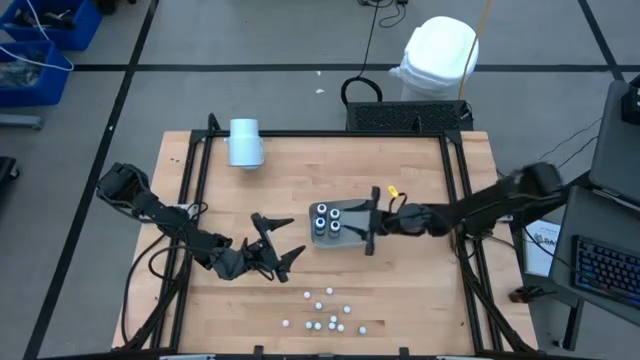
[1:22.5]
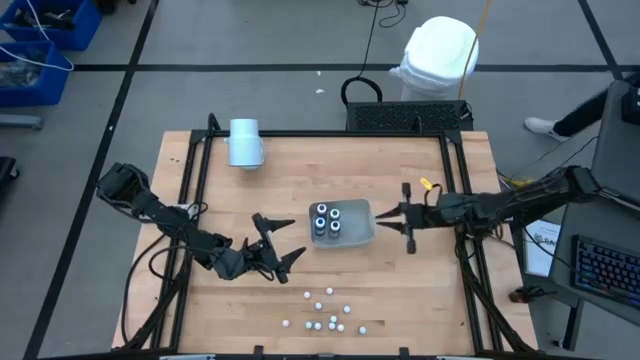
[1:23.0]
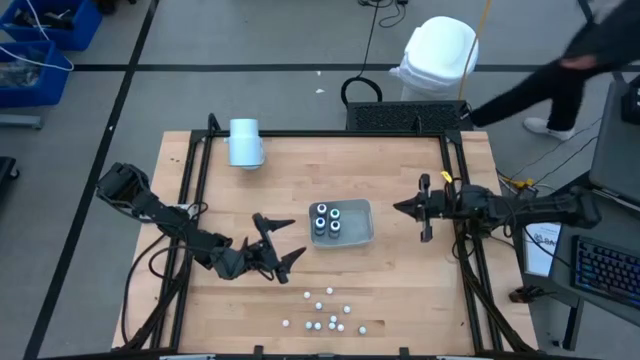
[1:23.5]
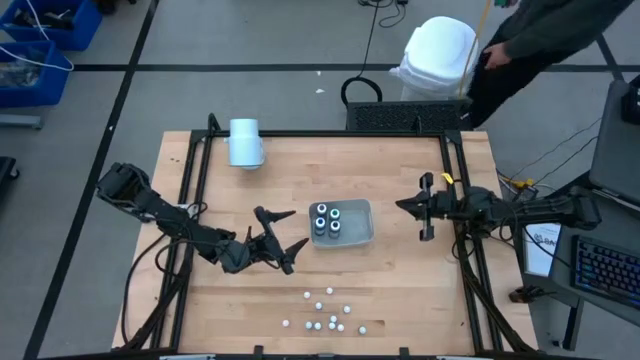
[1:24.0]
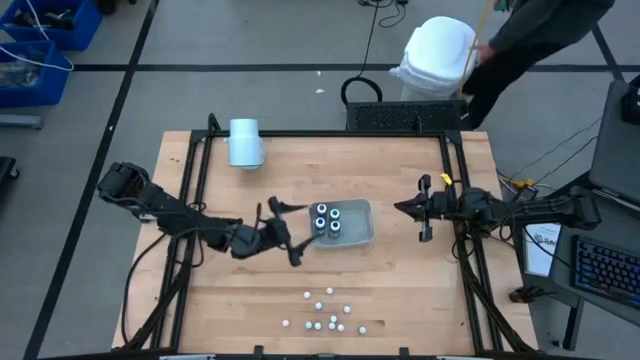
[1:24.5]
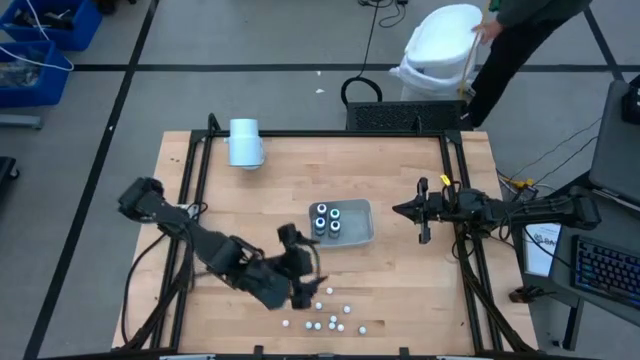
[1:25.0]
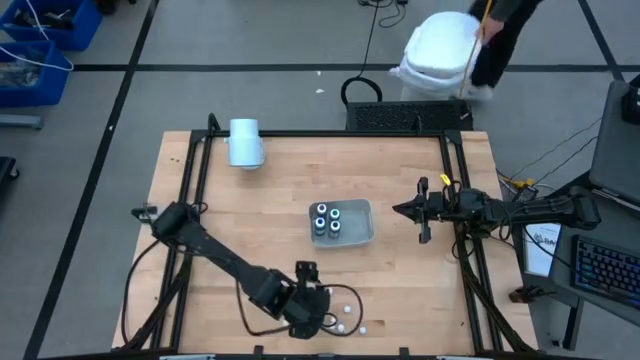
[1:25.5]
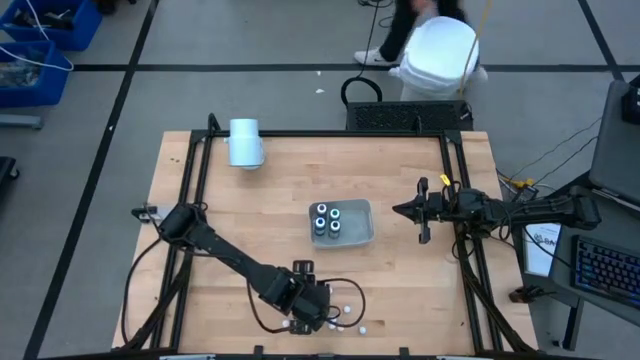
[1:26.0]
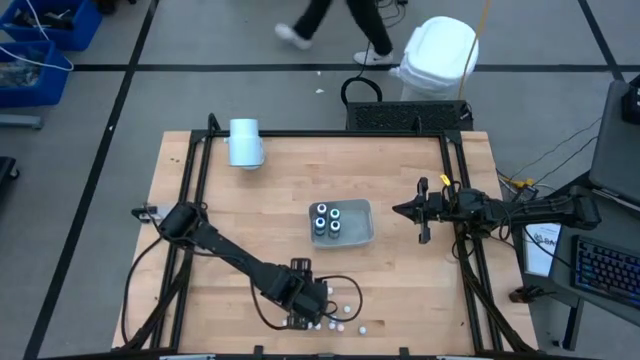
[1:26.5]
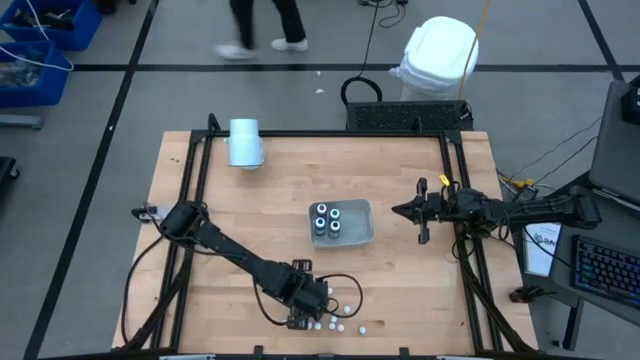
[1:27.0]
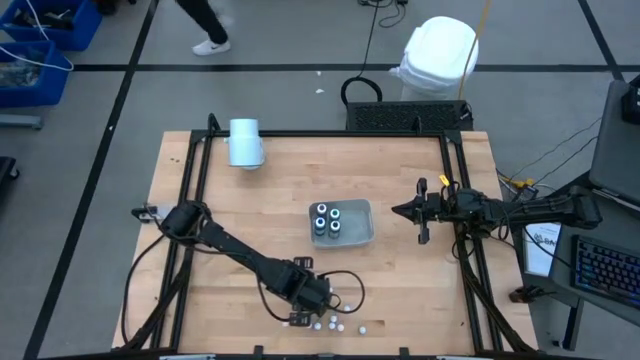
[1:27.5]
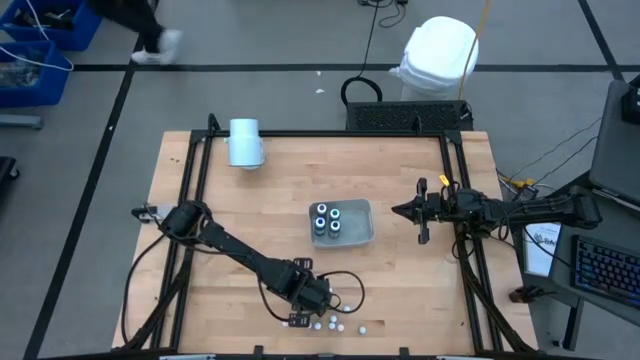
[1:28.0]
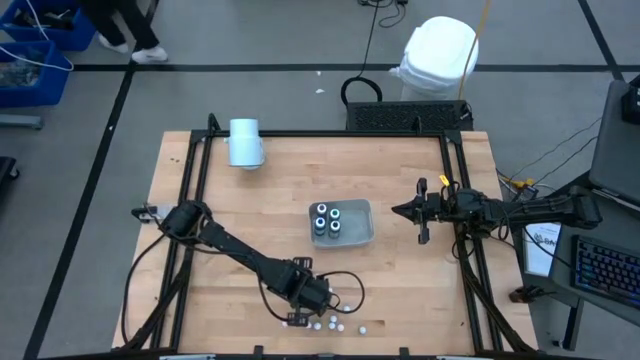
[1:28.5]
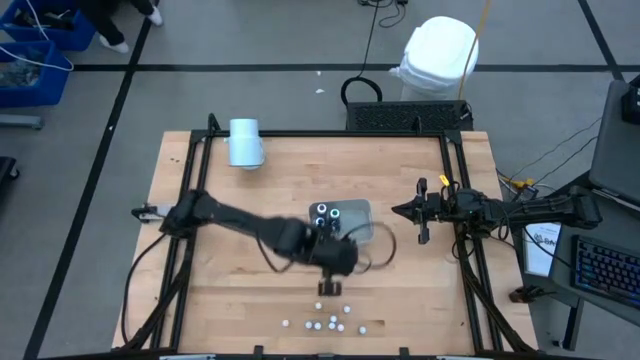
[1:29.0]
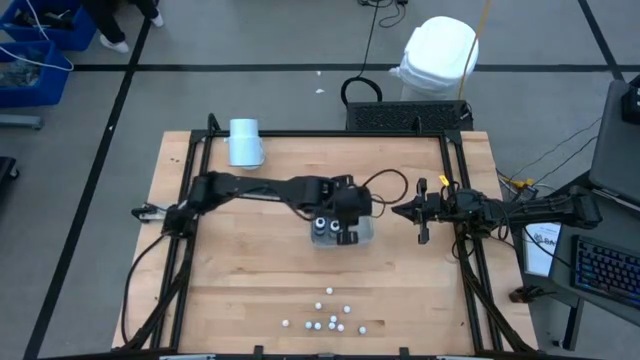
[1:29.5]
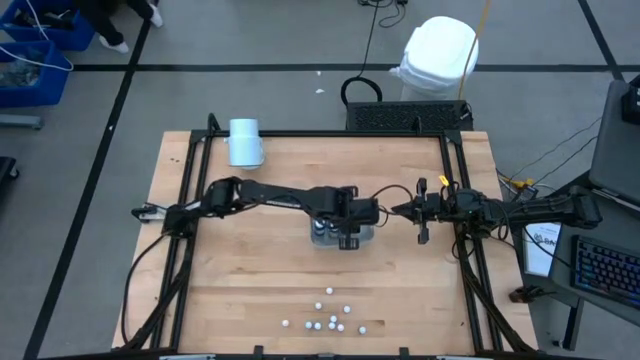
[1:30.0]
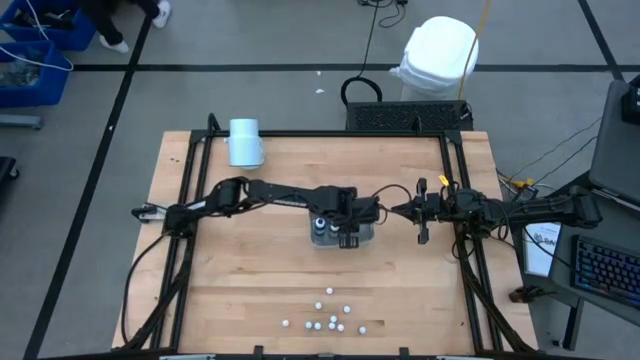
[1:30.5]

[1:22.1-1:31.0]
Task: Pick & Place food coloring
Put the small orange food coloring bottle into the gray bin

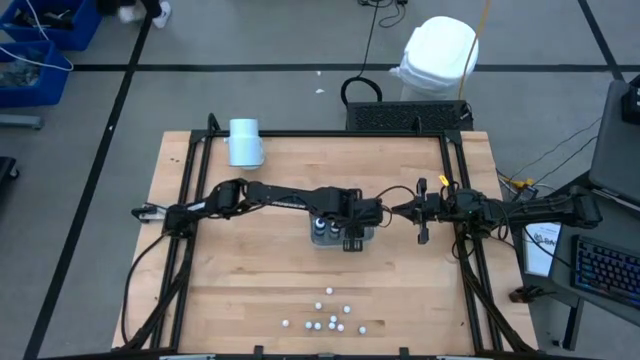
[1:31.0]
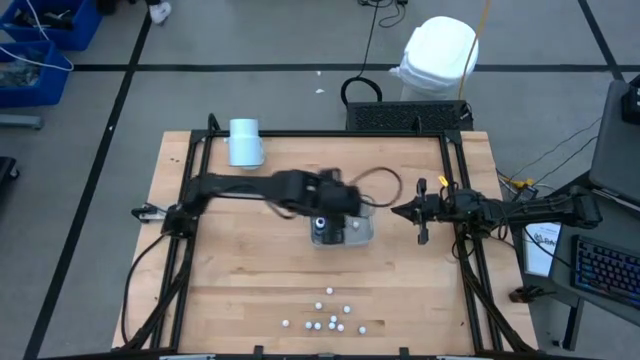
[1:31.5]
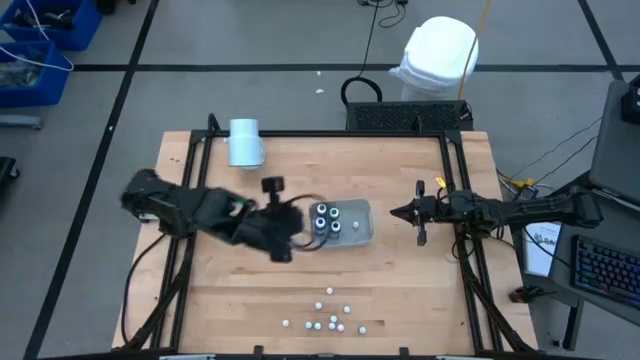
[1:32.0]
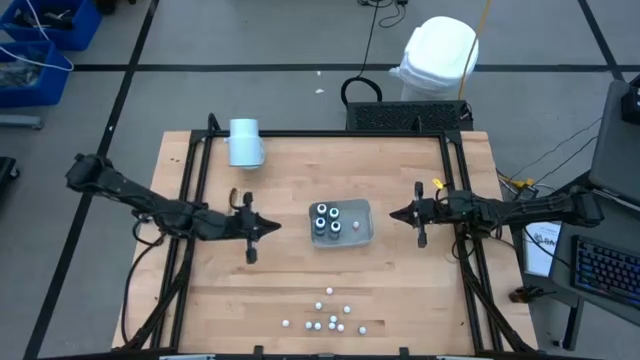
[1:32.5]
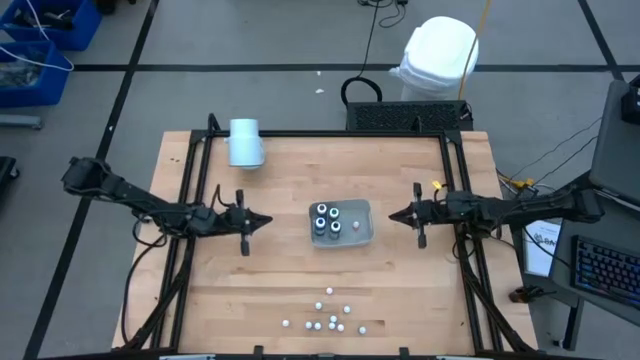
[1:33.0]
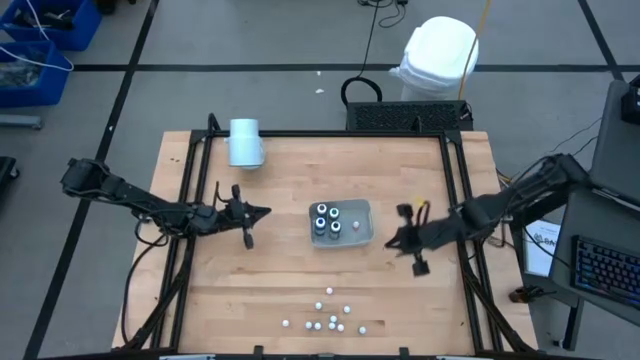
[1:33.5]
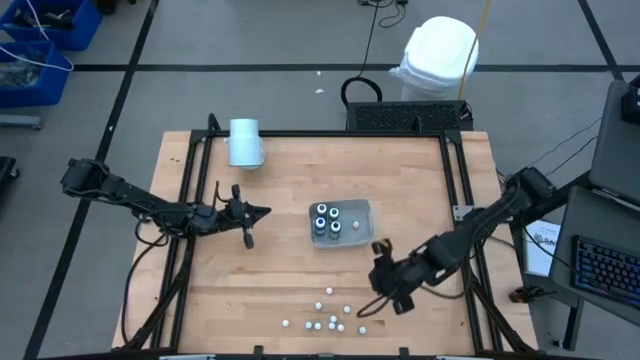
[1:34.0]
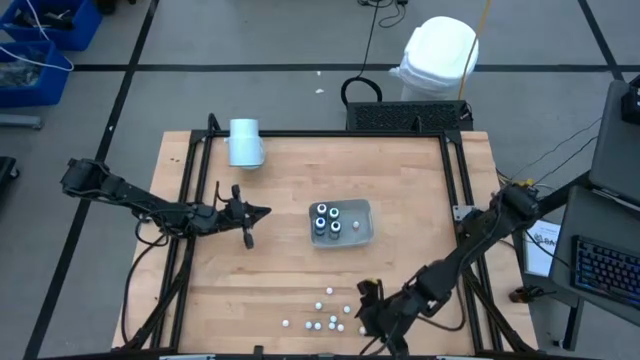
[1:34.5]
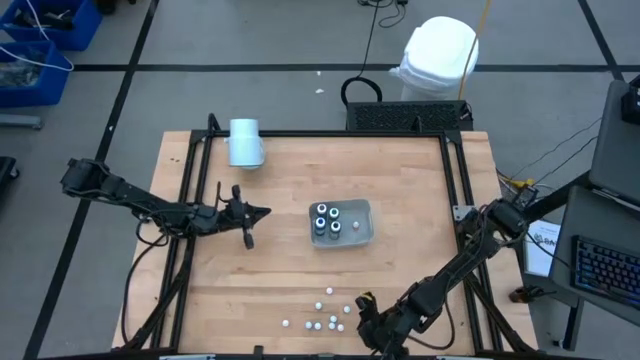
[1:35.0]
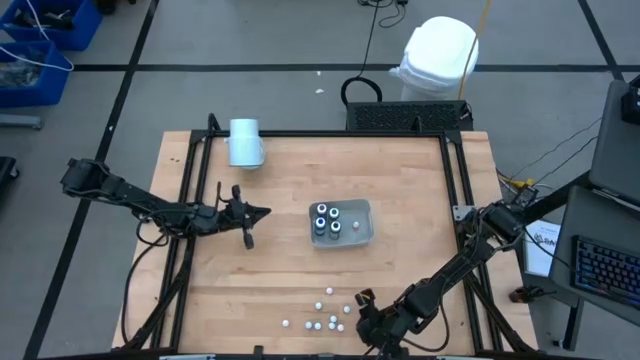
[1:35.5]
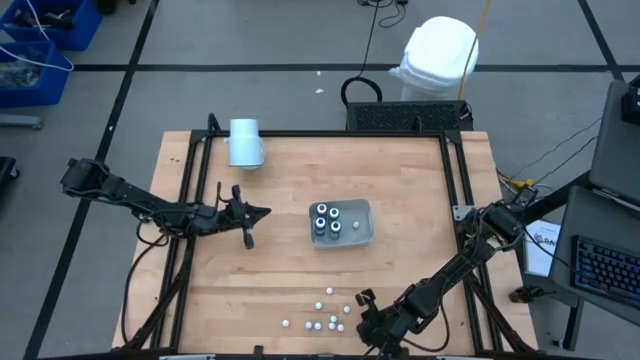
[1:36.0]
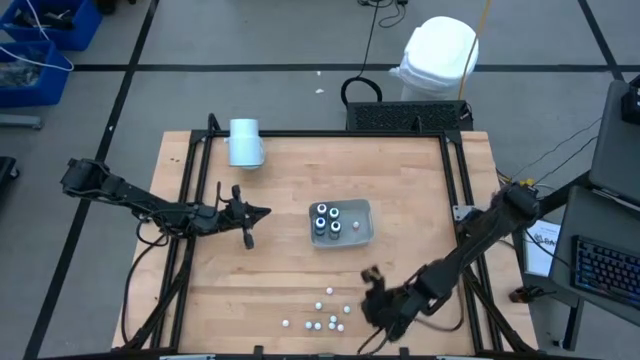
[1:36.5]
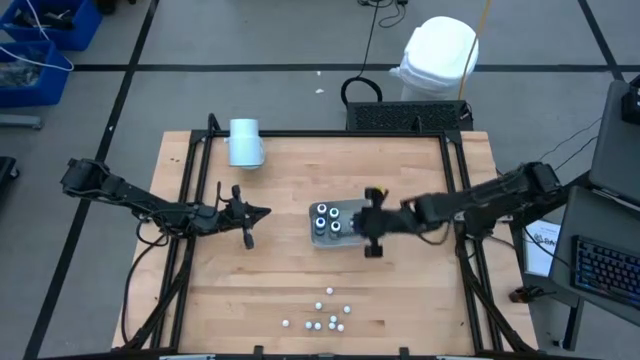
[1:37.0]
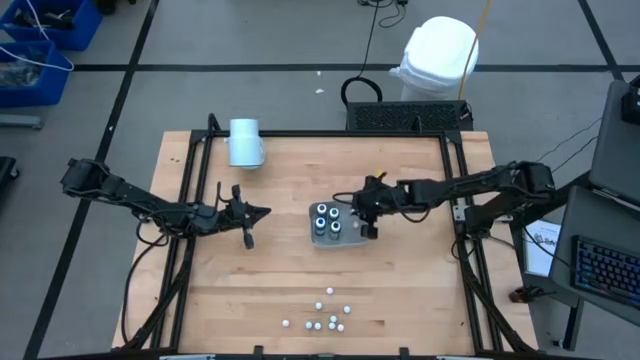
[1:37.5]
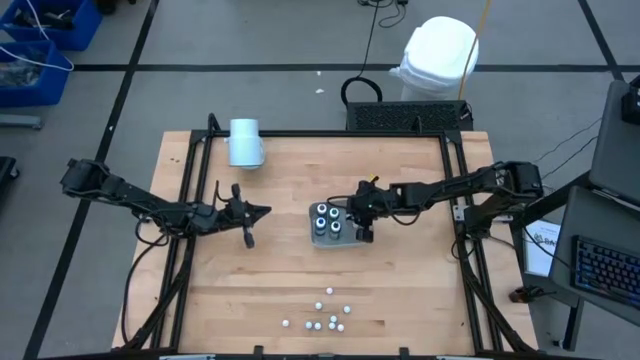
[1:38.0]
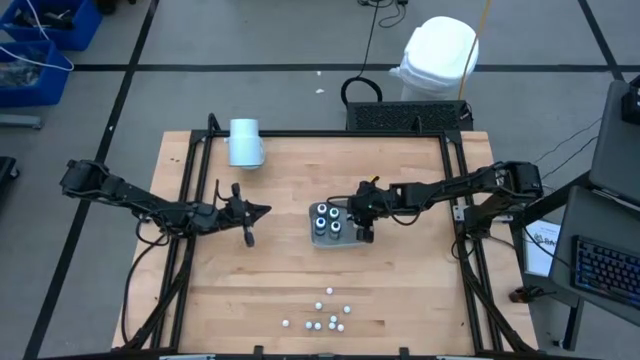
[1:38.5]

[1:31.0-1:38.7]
Put the small green food coloring bottle into the gray bin

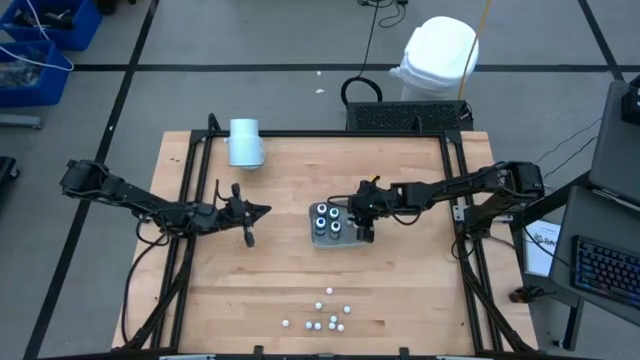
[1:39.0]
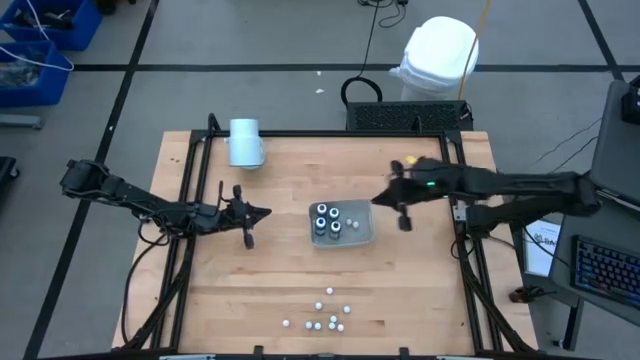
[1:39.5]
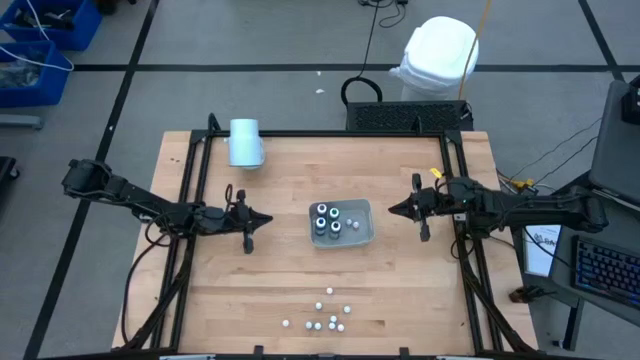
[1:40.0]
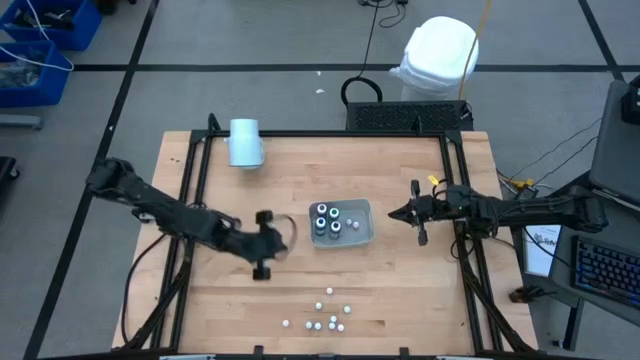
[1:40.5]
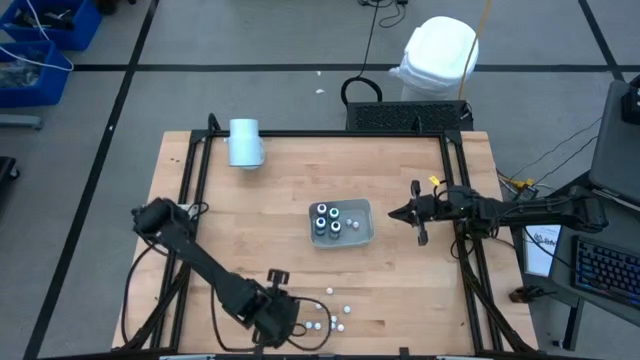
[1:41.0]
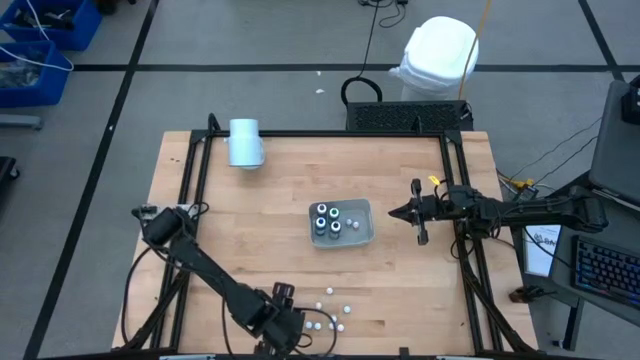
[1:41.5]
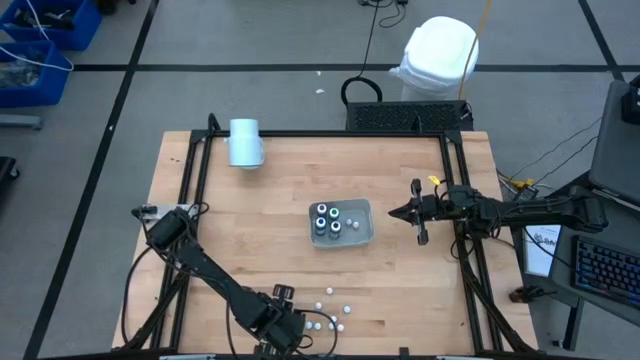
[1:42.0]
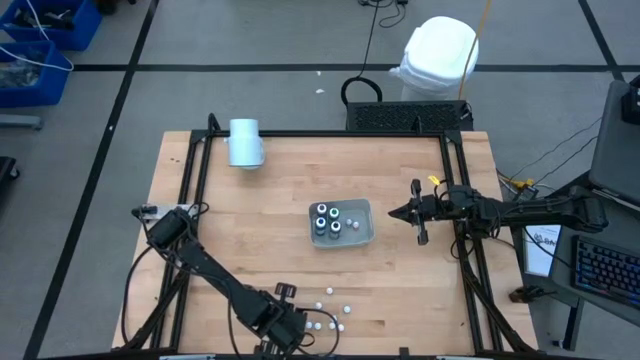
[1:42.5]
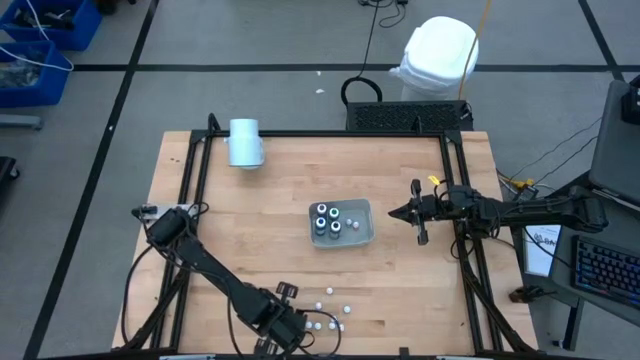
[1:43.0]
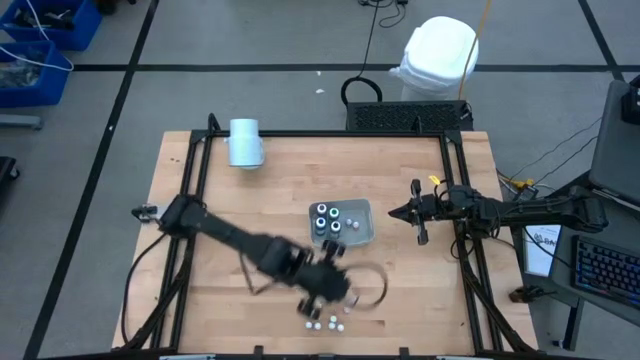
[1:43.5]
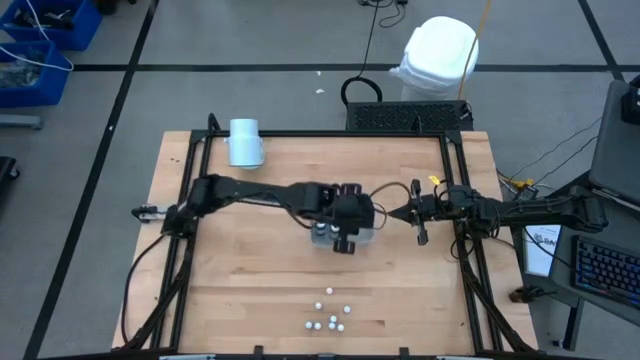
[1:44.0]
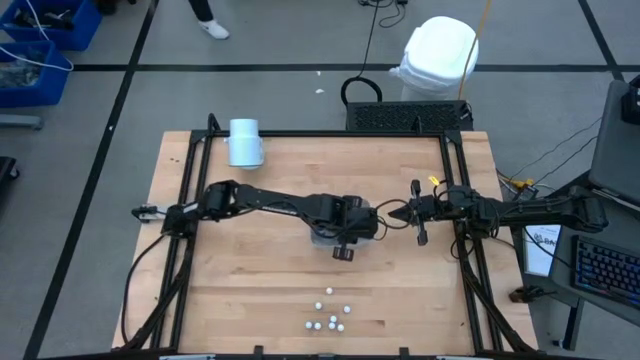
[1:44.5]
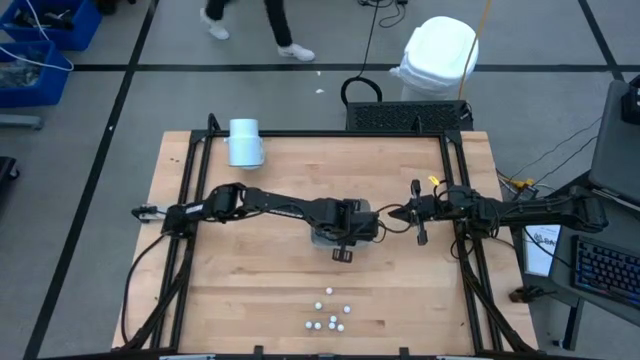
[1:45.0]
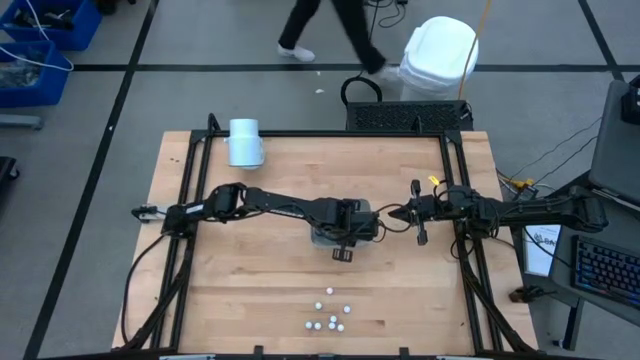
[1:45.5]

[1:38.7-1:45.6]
Put the small orange food coloring bottle into the gray bin
